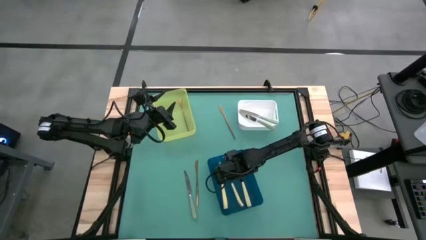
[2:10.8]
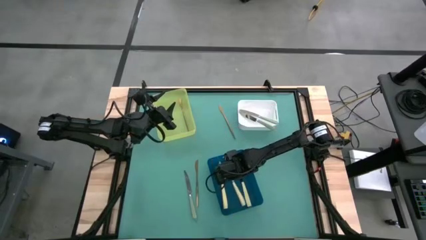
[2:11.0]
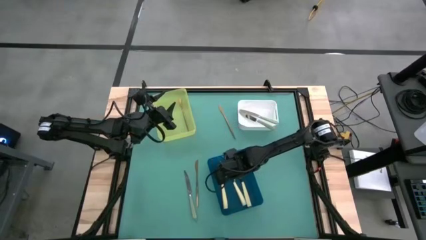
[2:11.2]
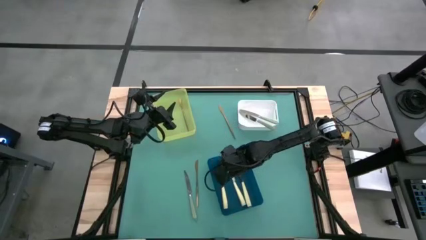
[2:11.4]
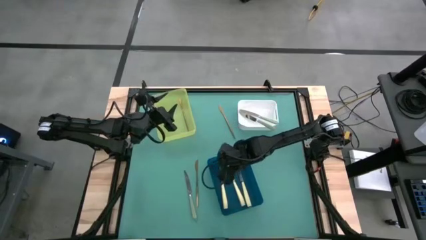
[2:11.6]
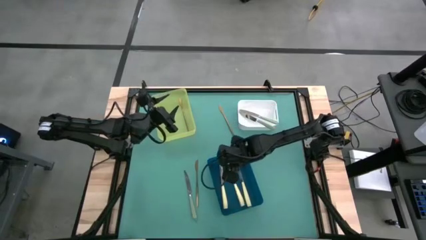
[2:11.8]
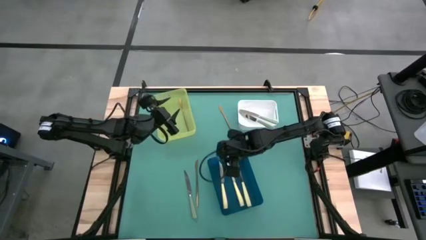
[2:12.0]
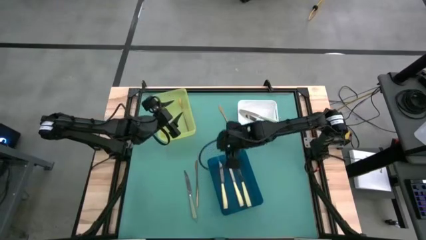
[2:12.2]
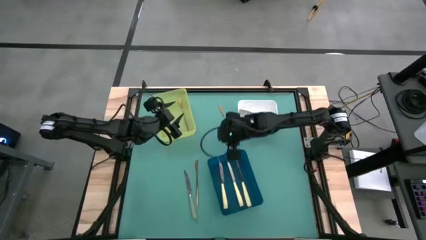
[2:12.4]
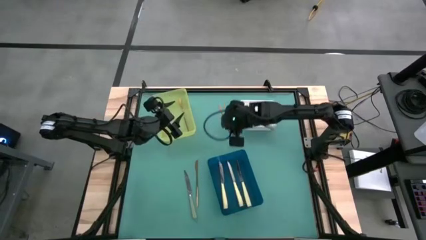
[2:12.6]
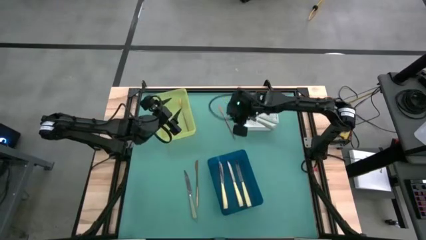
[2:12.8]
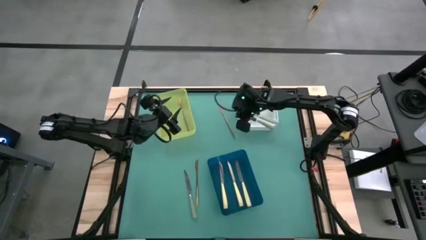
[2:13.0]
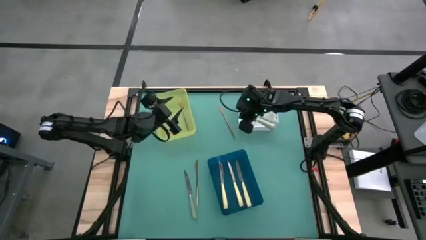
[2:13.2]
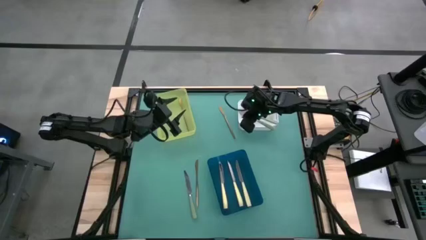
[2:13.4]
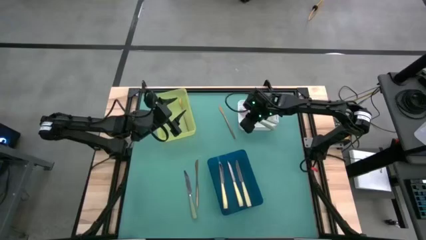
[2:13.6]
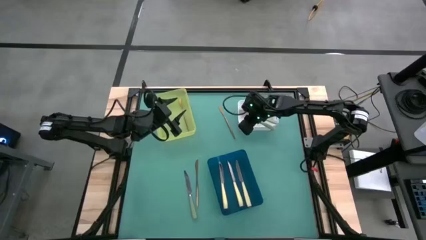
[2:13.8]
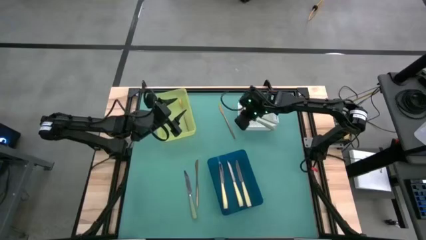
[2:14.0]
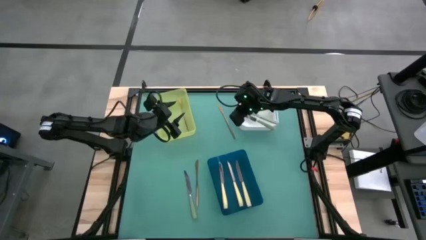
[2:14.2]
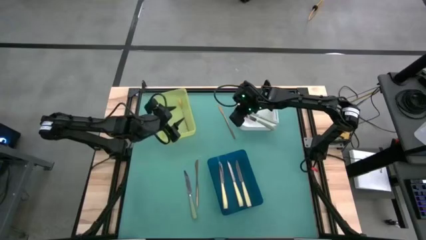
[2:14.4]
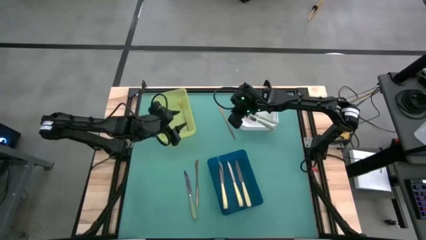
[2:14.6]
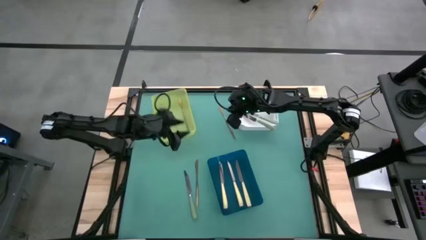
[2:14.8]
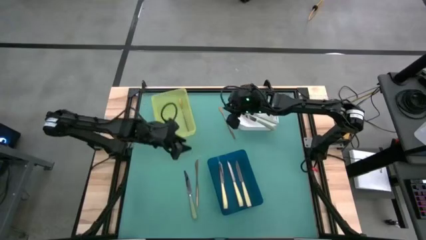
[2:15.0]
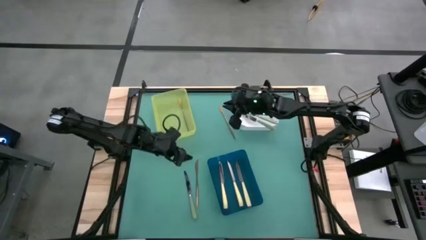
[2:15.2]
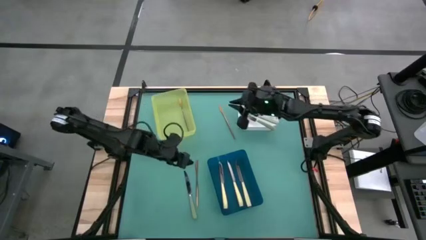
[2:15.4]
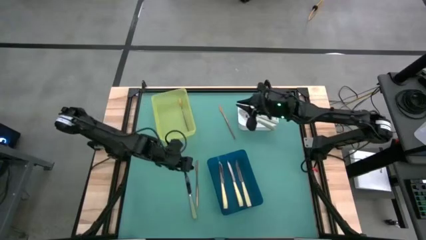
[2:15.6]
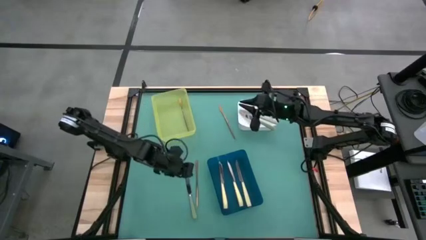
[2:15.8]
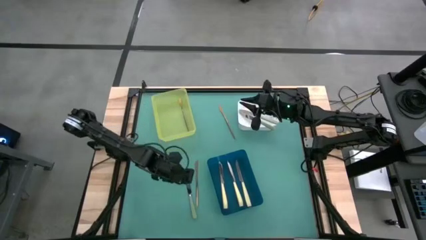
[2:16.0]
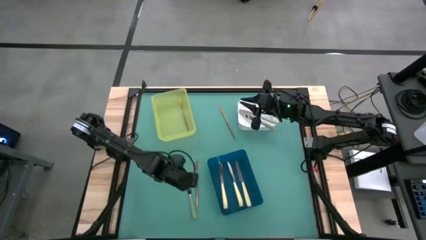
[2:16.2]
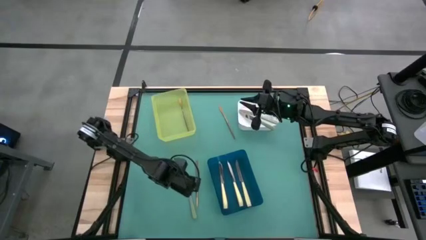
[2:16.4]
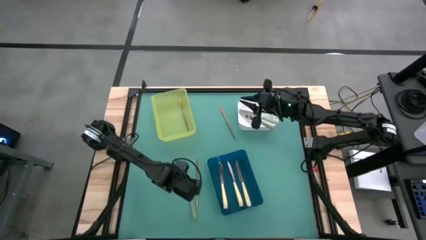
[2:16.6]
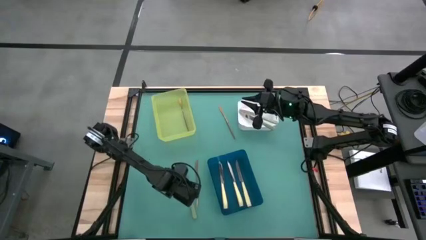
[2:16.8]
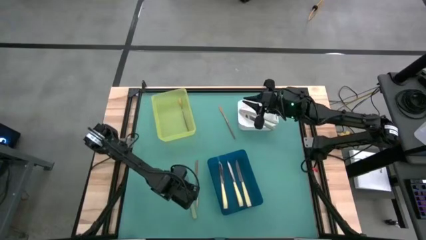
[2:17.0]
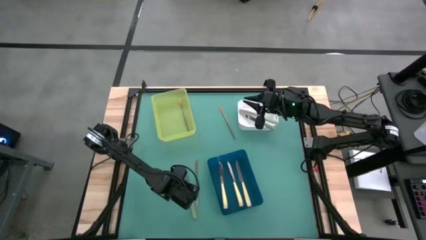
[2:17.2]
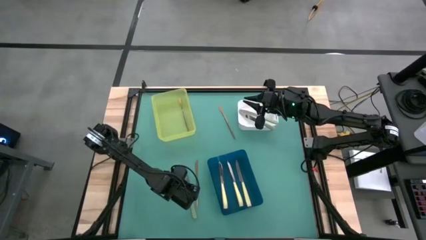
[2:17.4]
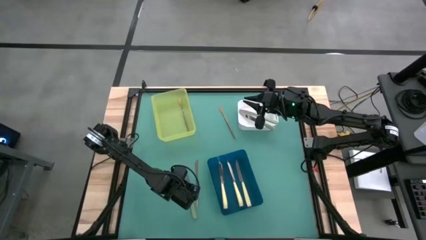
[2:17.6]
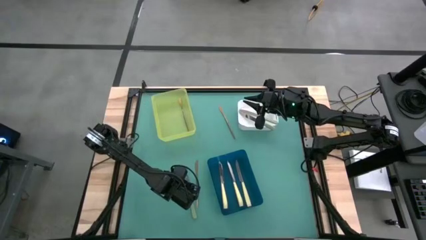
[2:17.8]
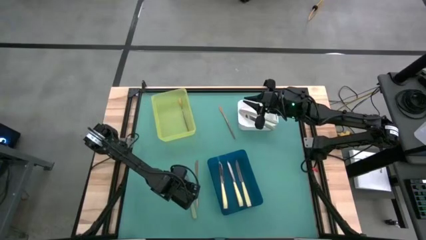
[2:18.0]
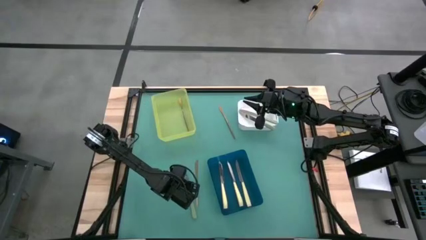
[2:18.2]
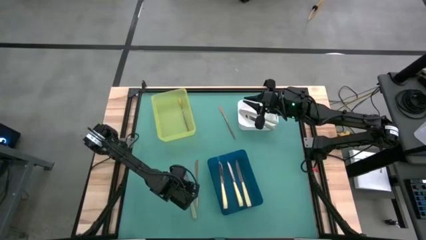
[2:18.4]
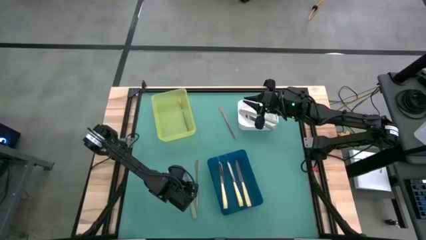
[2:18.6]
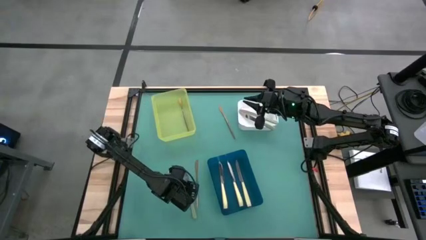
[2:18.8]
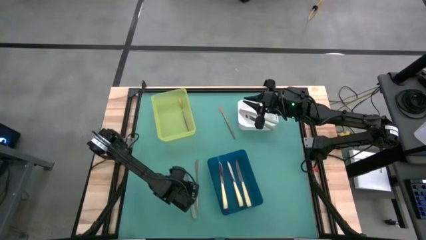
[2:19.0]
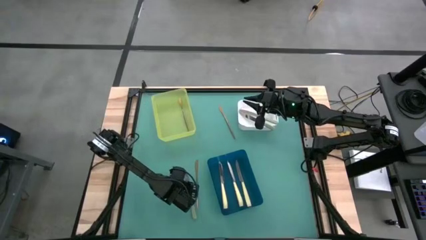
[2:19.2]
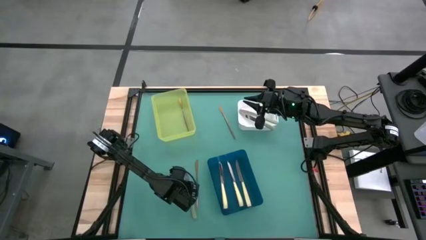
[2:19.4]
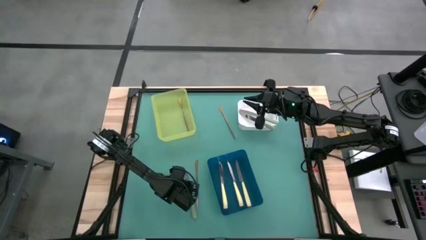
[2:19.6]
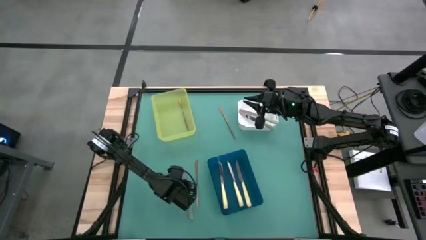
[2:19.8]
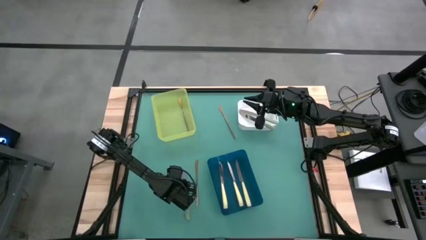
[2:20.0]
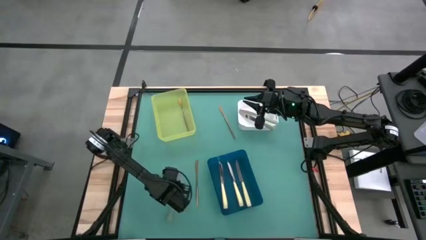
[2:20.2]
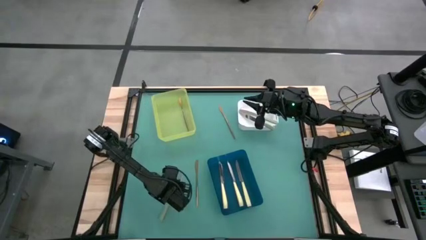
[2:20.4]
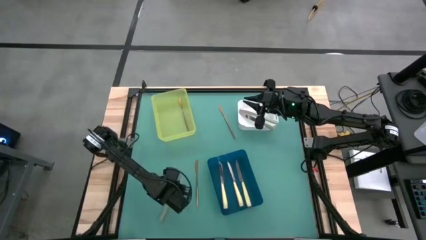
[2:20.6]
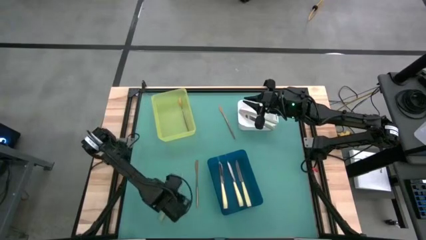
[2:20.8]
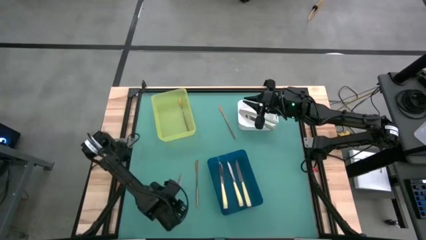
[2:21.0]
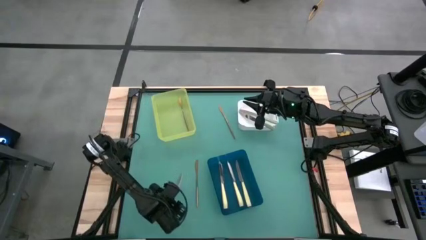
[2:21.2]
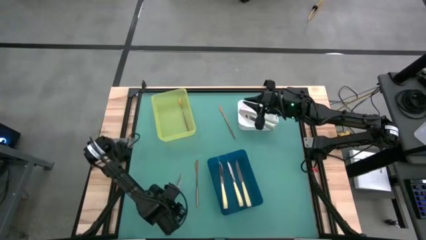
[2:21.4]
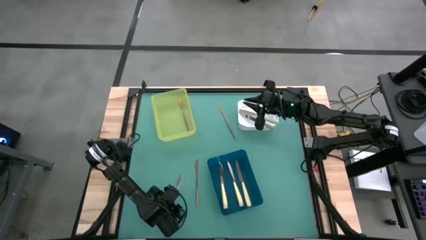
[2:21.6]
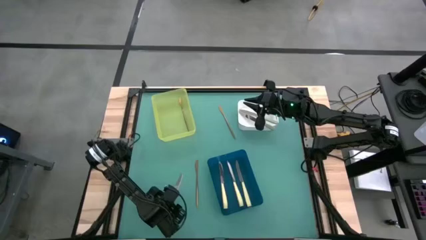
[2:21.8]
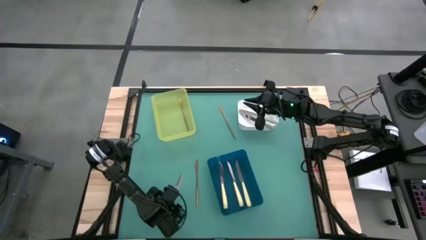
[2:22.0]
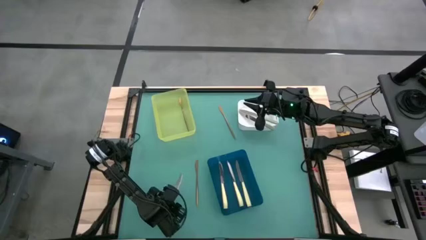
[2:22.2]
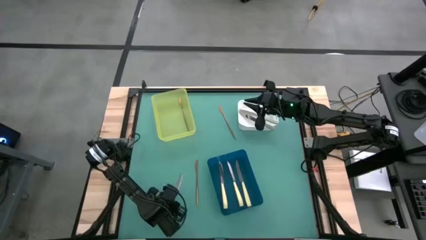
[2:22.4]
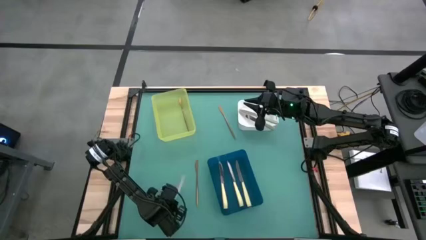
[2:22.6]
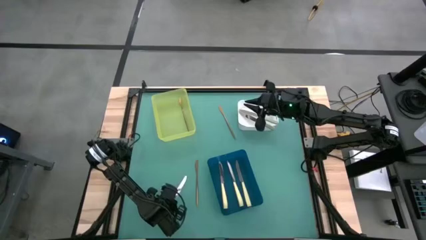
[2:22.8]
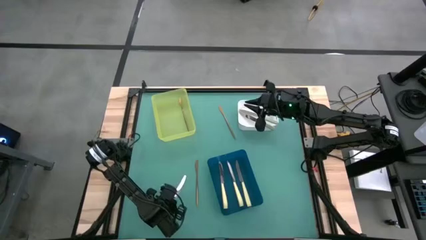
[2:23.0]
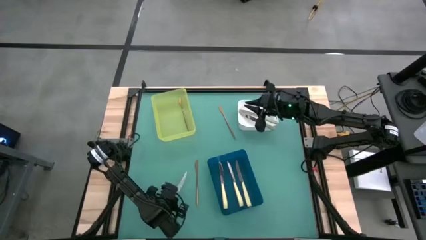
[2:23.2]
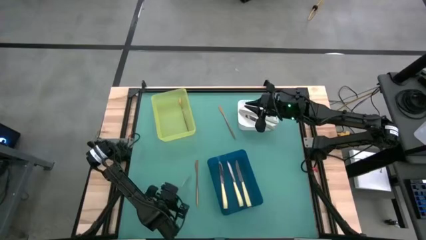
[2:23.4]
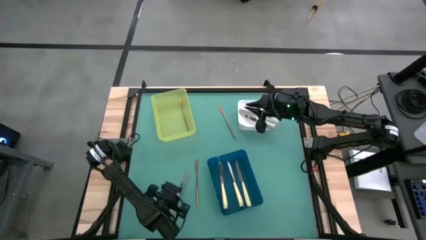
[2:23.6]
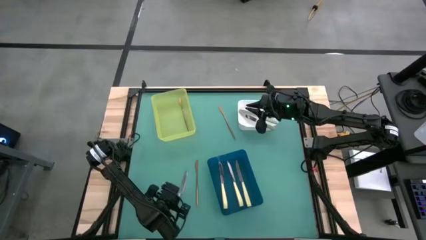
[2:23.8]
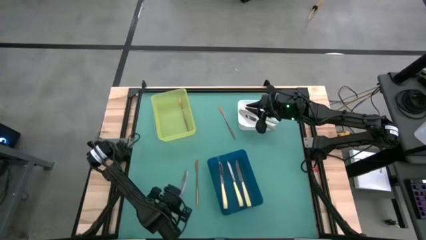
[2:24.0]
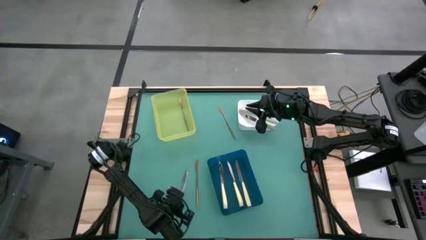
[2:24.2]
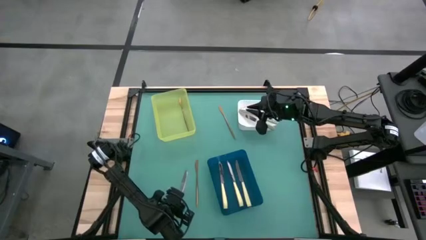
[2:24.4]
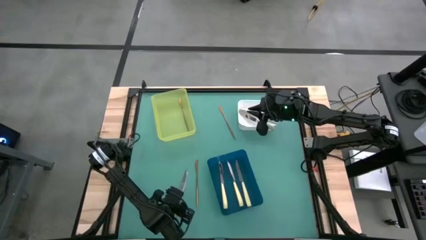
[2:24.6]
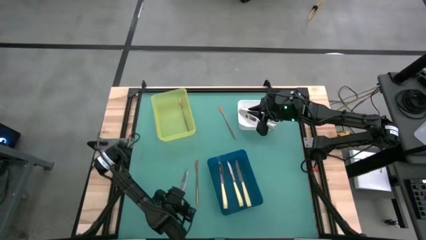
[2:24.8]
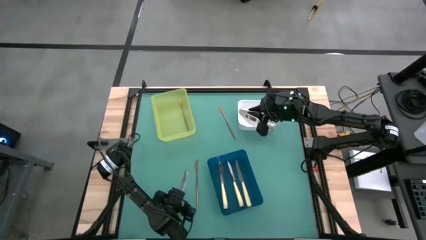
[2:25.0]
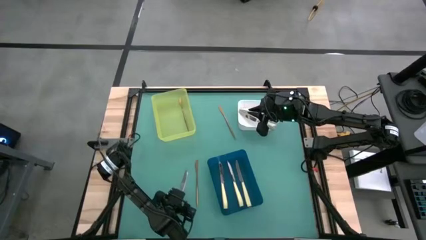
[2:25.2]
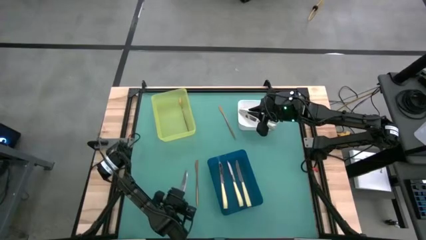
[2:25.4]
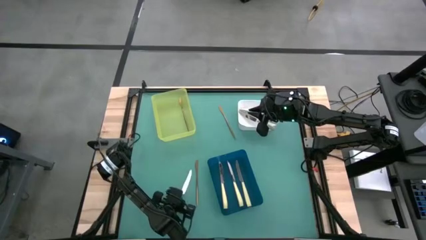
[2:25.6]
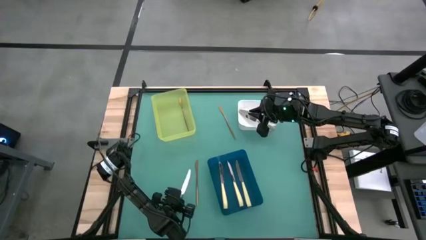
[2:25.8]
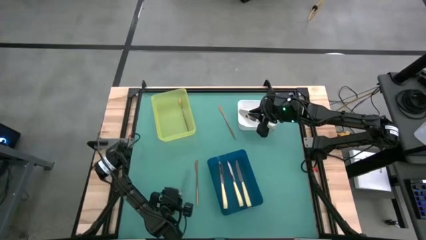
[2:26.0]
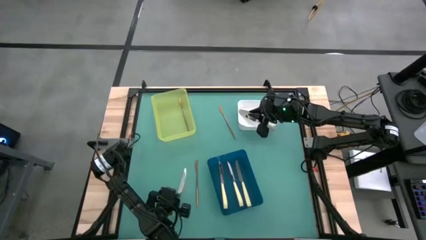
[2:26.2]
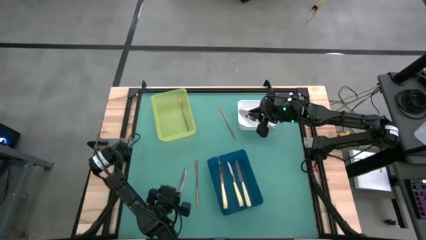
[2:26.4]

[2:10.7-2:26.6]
Task: Sort silverware by color (type)
Put the green knife into the white bin
